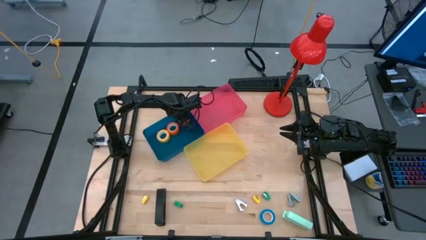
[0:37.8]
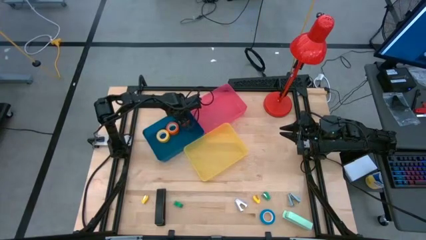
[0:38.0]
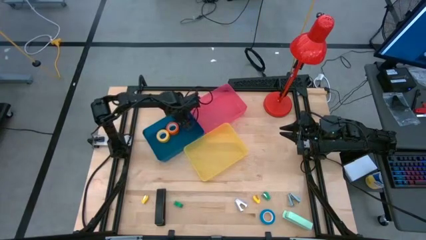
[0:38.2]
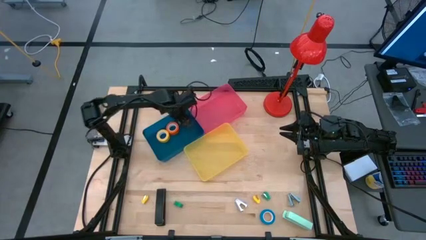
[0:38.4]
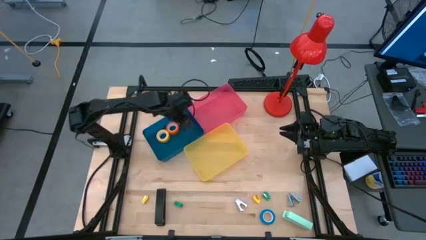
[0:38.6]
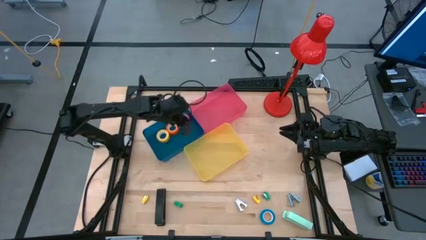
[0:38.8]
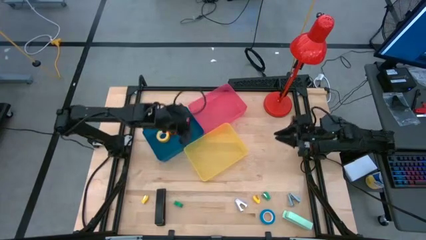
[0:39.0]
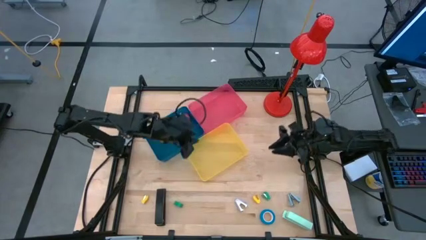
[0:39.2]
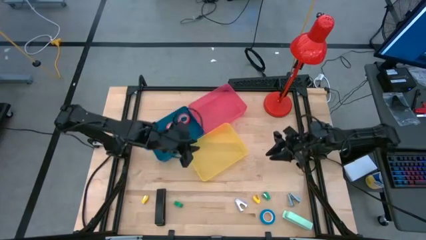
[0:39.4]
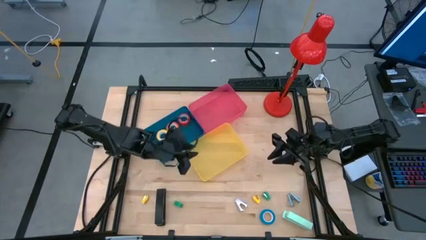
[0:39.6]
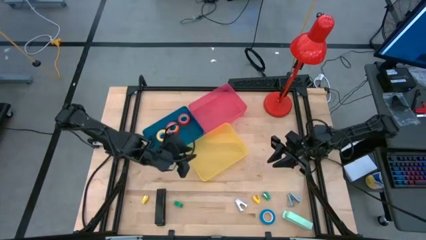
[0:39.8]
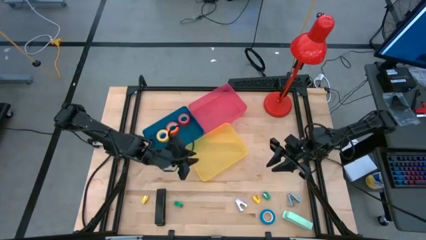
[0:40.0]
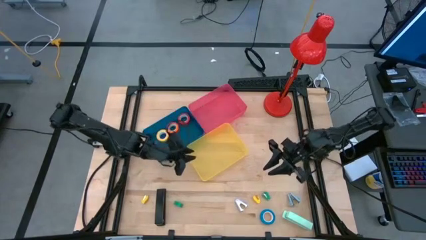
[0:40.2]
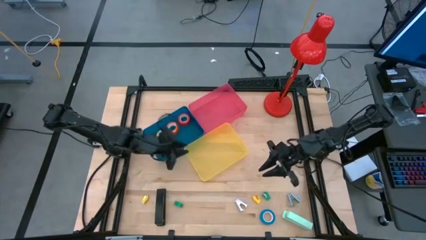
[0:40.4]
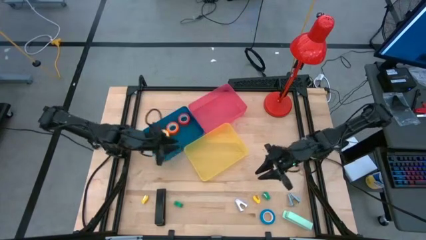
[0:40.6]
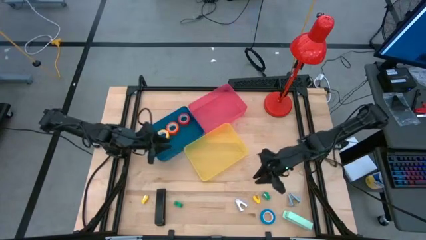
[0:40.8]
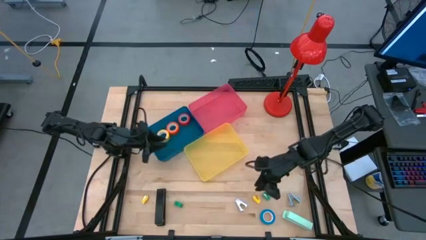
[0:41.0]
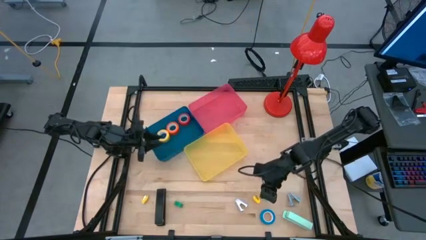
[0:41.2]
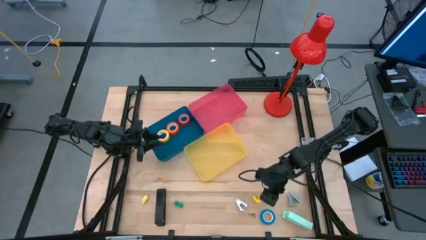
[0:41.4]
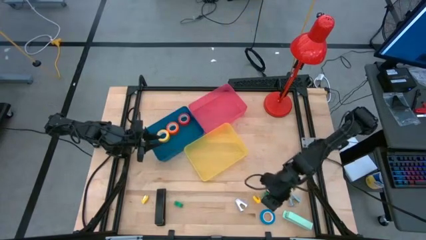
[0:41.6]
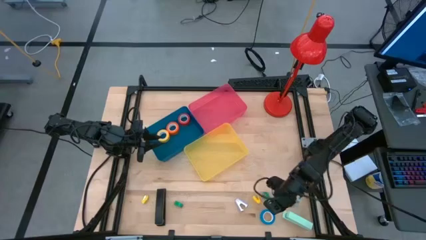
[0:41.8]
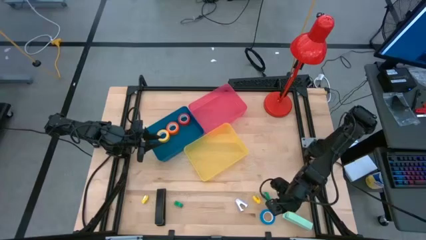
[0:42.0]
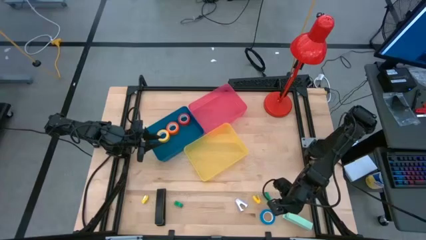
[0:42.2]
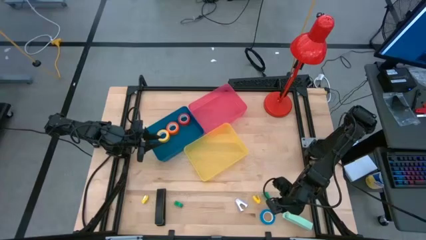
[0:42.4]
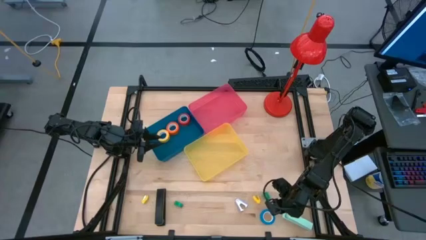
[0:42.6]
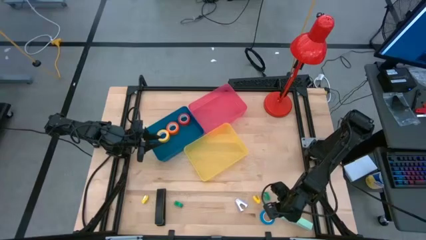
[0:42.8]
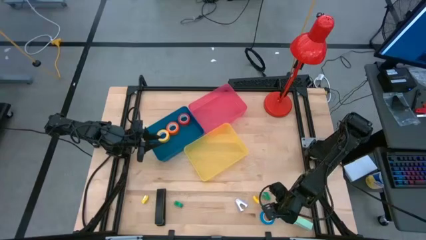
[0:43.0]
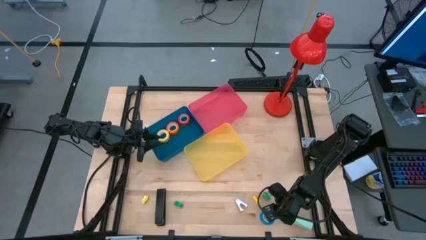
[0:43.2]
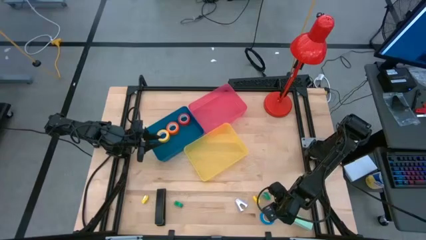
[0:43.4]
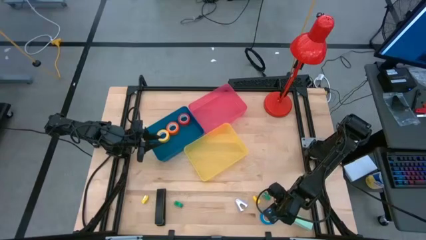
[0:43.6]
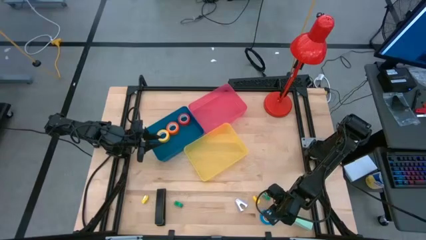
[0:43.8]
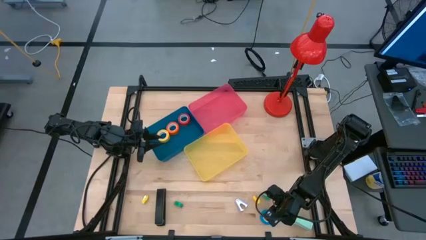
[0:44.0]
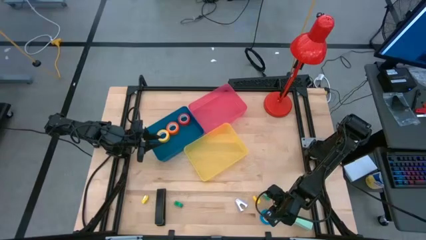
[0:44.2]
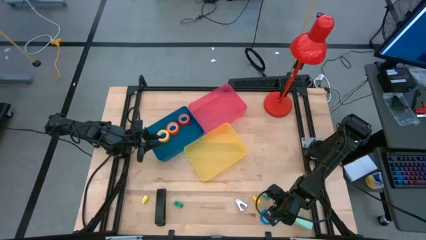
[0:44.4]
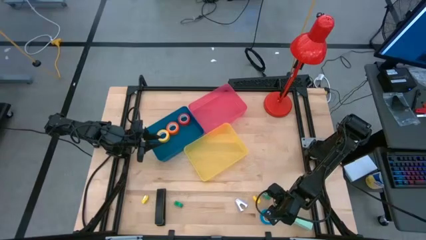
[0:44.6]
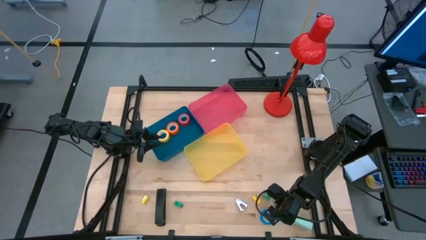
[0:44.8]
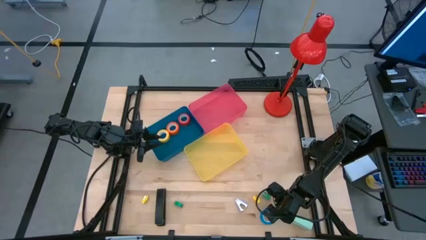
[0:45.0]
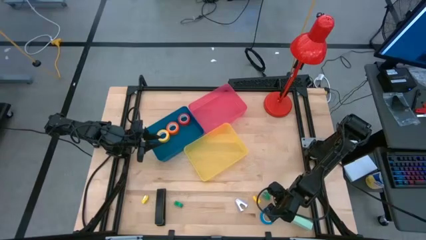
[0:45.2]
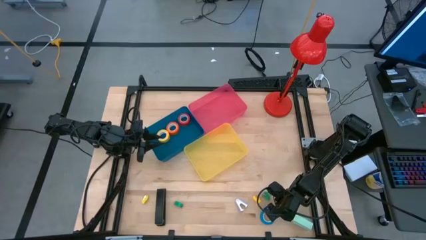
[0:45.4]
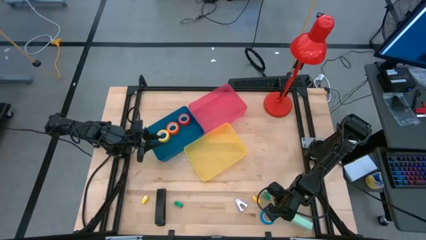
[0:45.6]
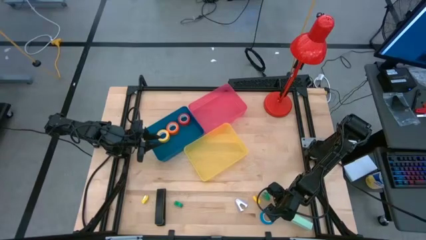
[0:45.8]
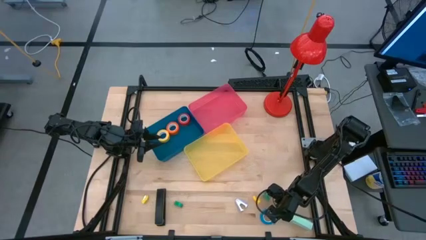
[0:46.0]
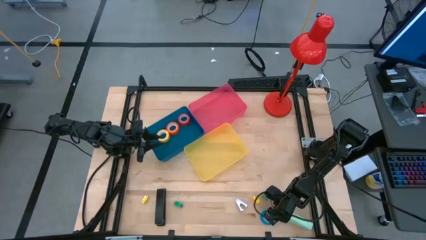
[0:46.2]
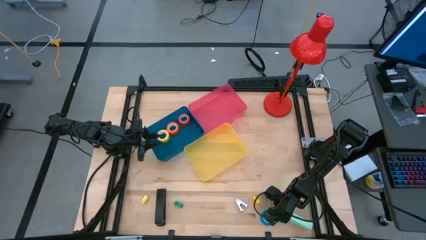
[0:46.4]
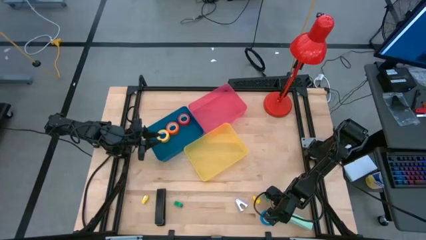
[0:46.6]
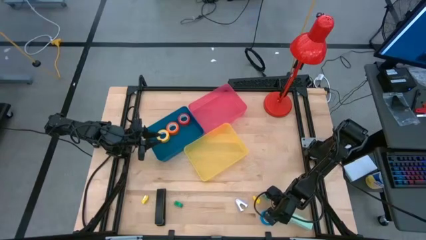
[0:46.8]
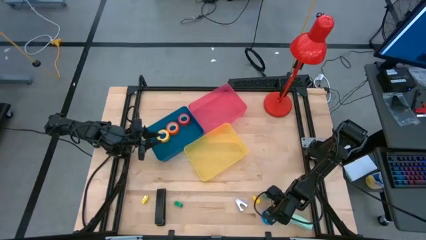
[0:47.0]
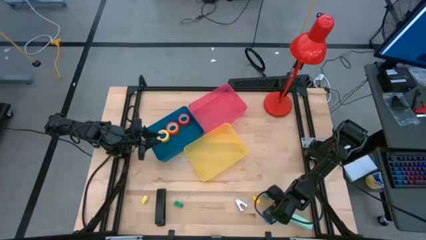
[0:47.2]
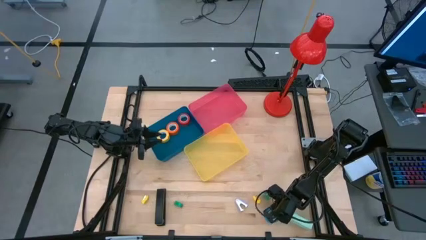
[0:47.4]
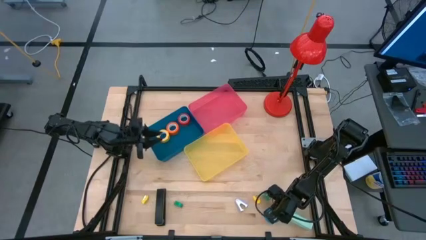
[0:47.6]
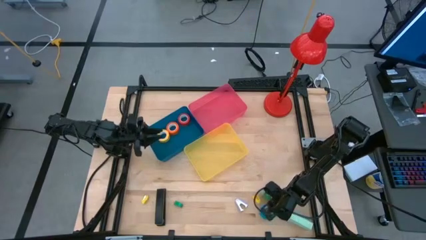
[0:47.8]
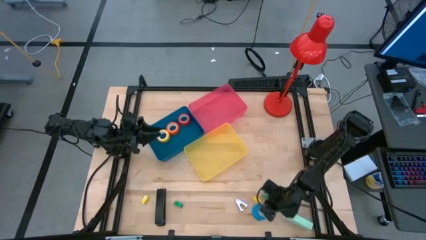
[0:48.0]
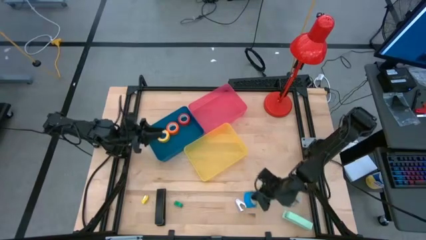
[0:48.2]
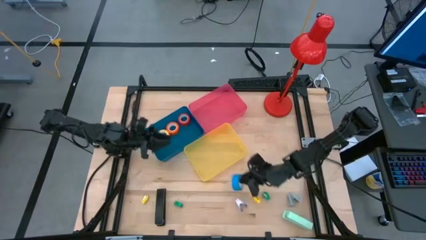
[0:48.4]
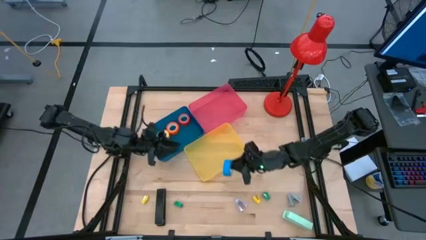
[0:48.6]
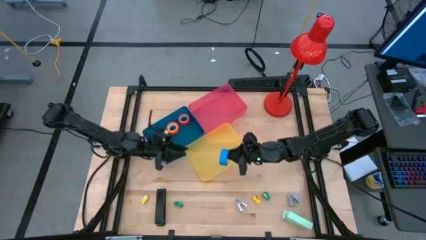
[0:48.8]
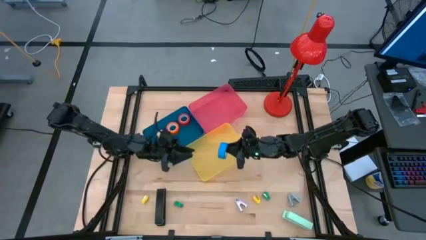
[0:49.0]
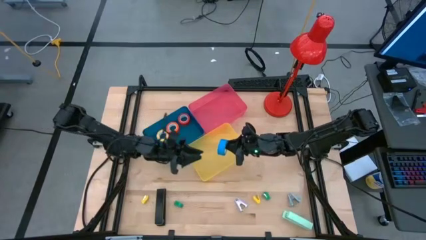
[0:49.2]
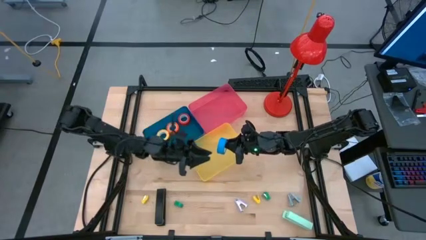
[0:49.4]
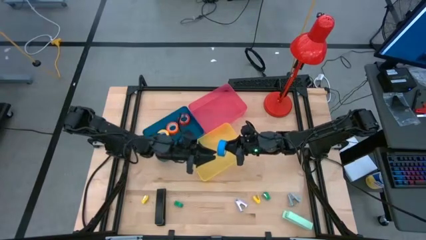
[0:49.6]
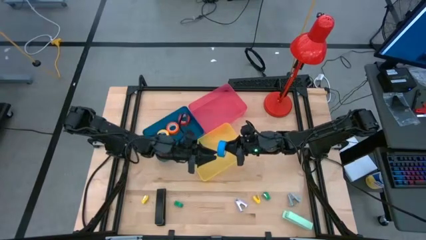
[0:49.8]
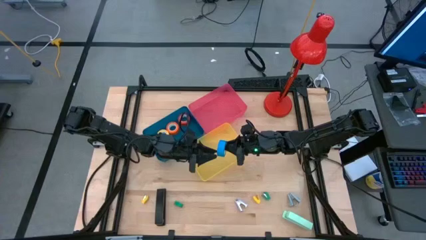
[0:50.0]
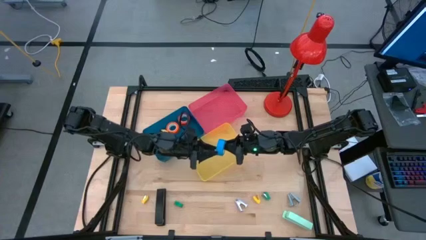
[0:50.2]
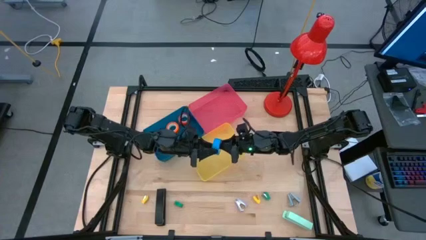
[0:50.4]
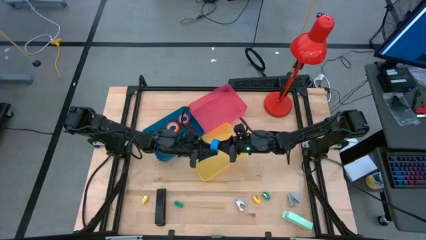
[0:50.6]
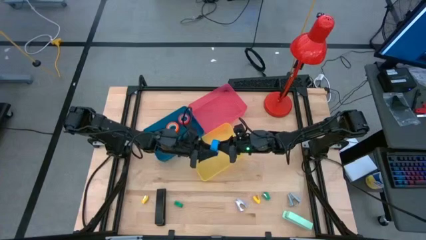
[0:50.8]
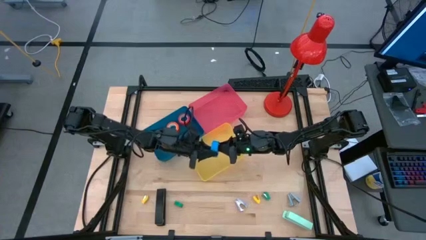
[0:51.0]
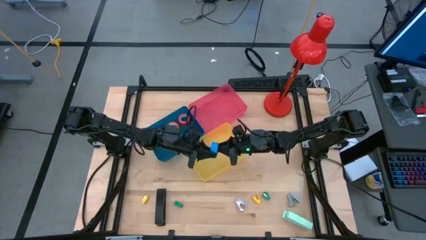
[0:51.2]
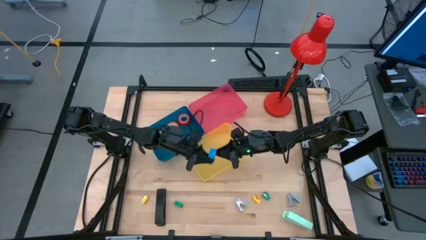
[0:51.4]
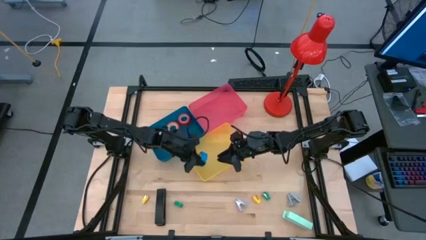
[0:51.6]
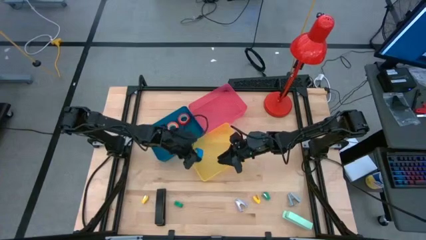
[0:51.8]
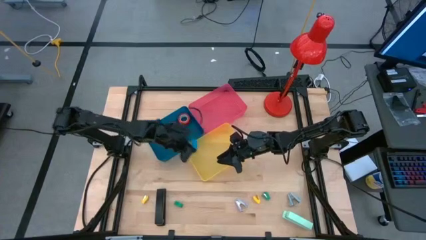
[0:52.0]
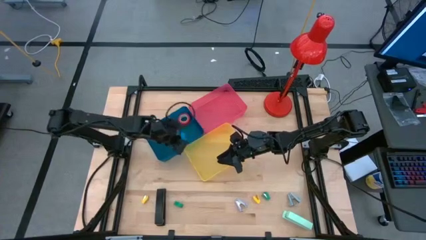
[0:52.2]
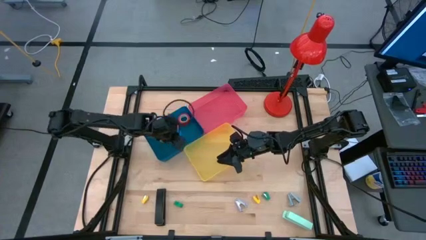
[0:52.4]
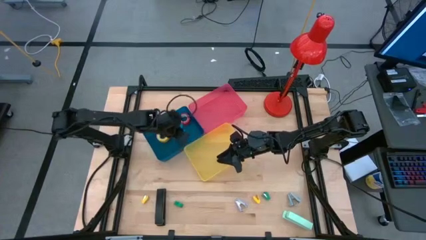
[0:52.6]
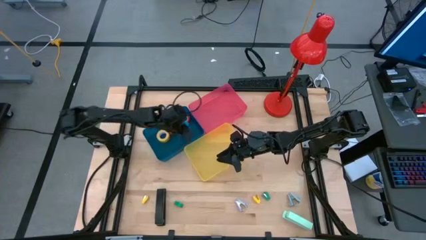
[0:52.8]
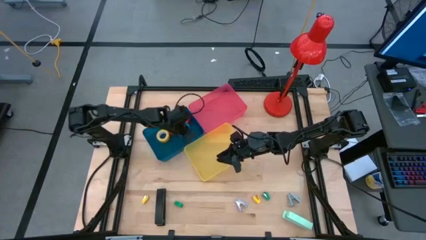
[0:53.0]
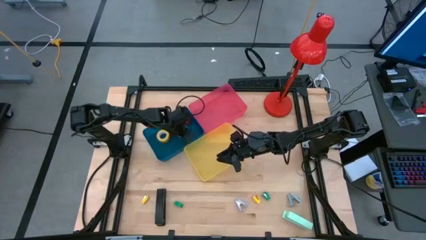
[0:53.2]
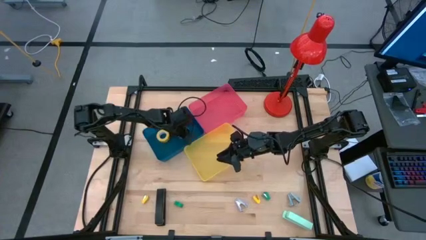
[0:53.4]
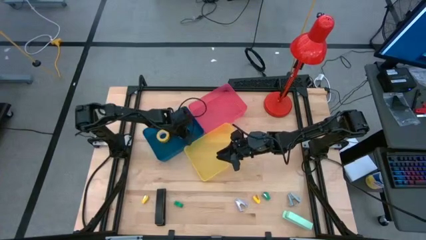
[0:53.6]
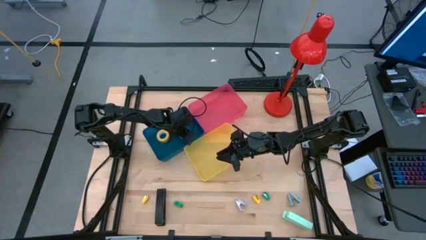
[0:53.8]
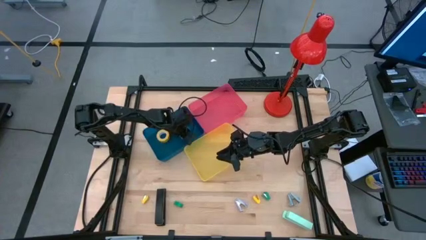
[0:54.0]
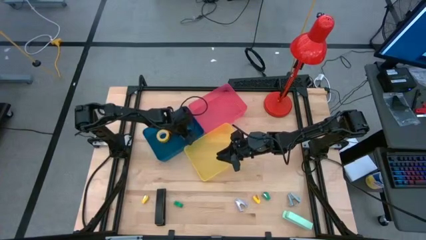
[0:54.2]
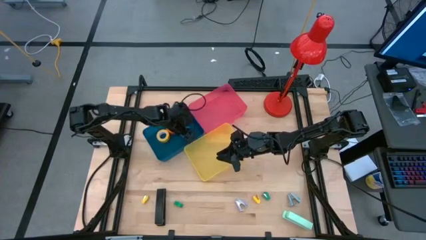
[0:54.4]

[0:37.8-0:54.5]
Task: Pick and place Stapler, Stapler remover, tape
Put the blue tape into the blue bin
